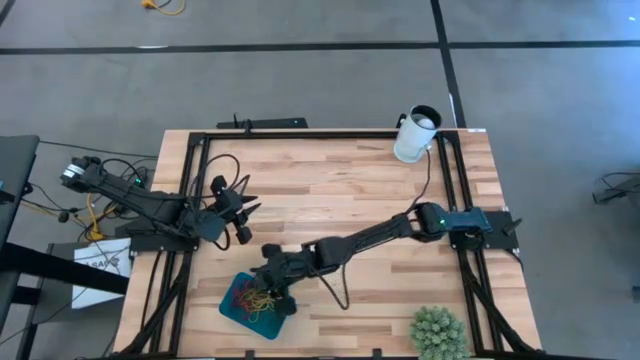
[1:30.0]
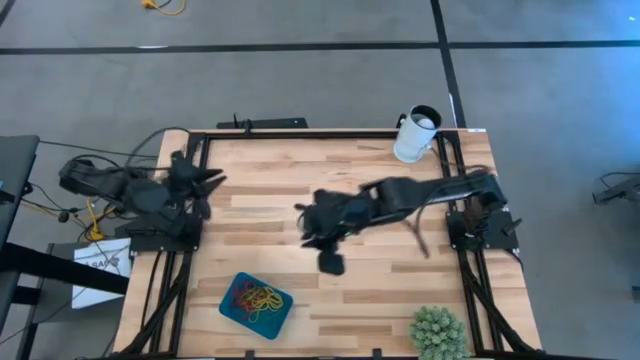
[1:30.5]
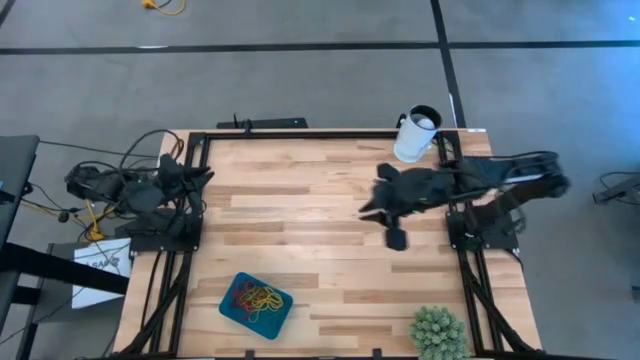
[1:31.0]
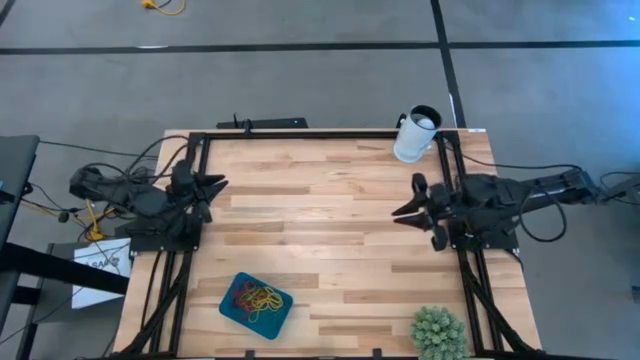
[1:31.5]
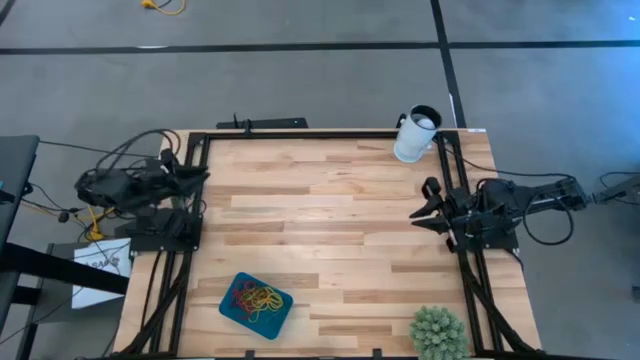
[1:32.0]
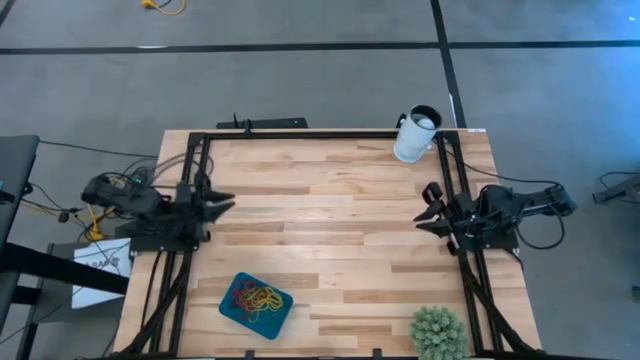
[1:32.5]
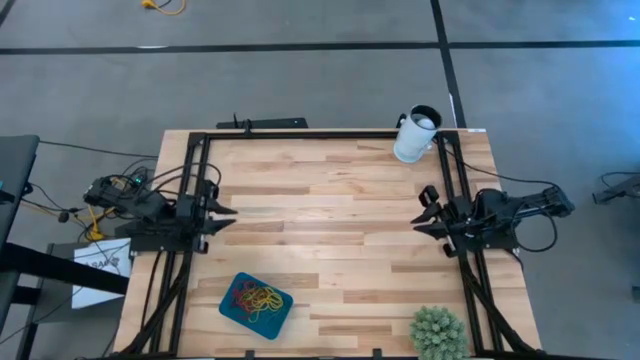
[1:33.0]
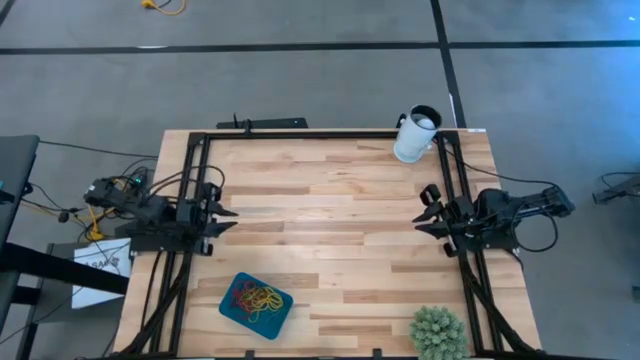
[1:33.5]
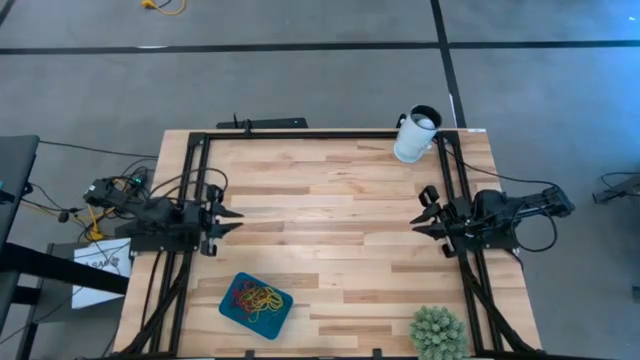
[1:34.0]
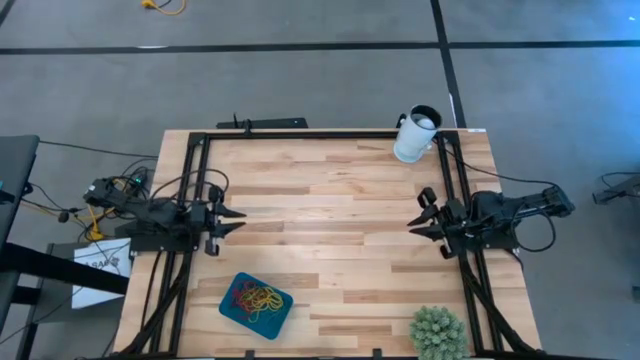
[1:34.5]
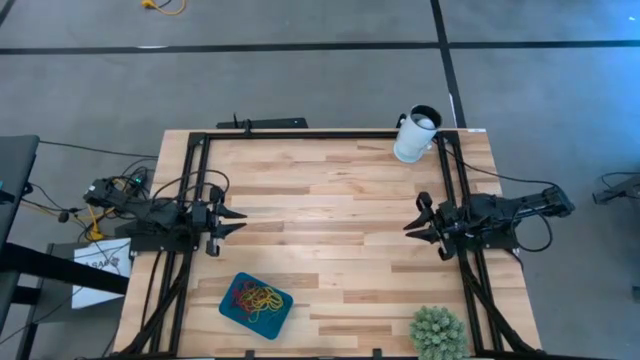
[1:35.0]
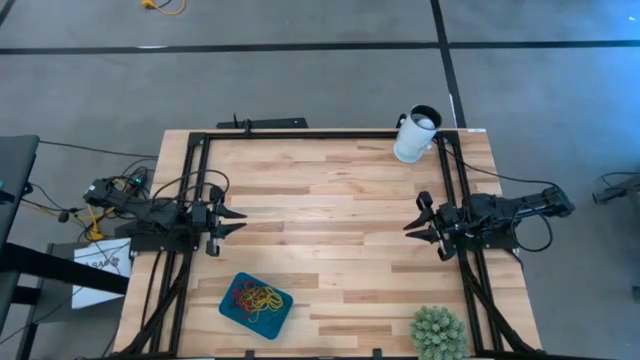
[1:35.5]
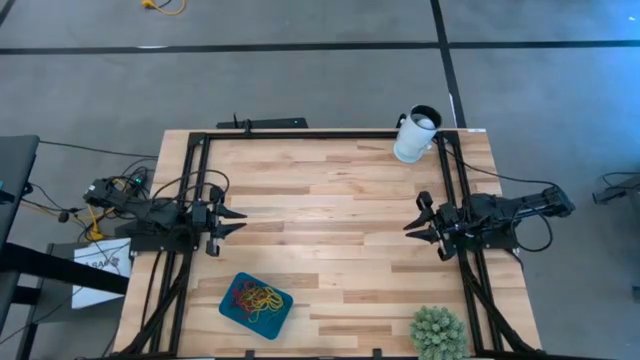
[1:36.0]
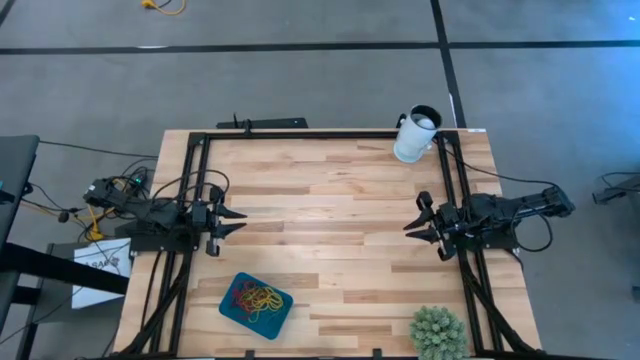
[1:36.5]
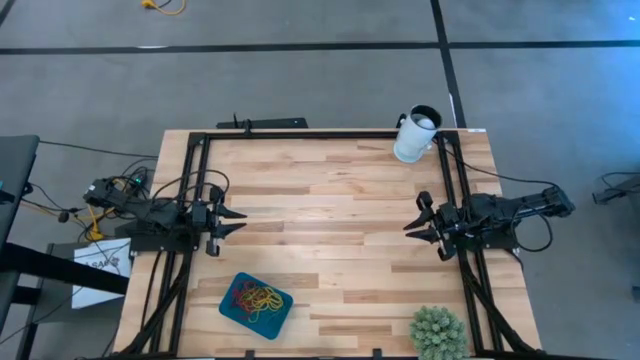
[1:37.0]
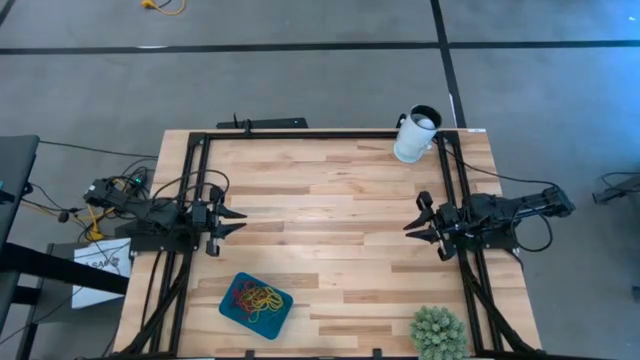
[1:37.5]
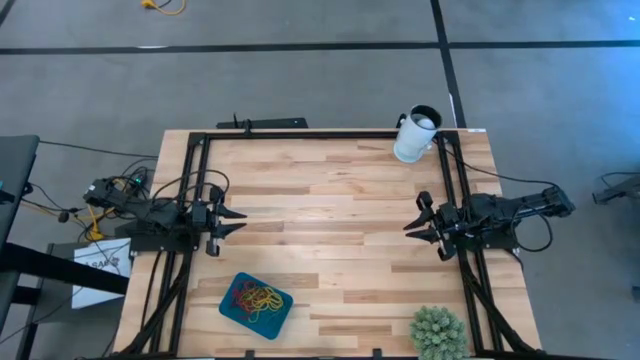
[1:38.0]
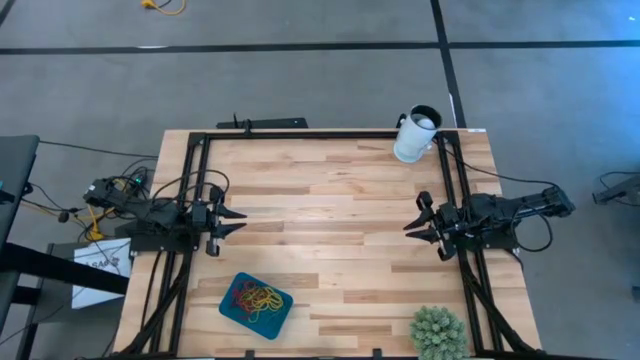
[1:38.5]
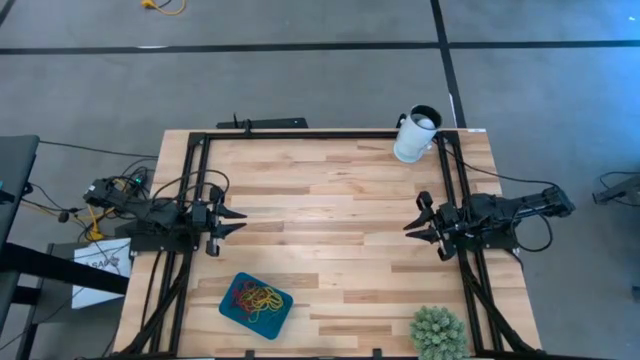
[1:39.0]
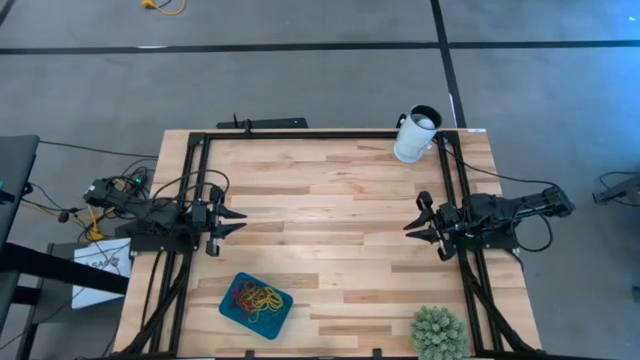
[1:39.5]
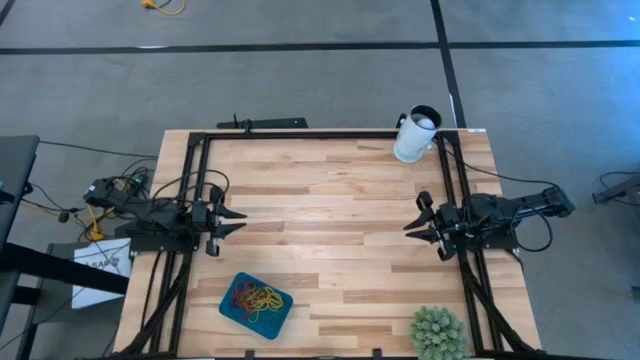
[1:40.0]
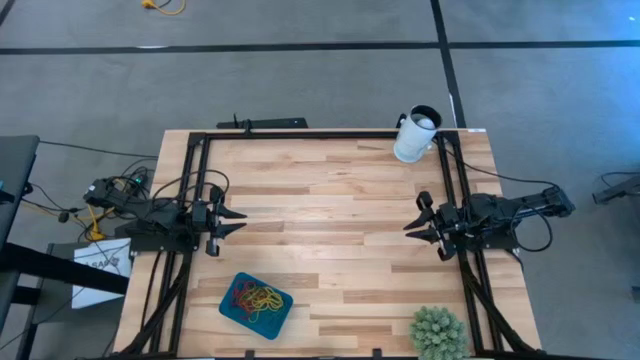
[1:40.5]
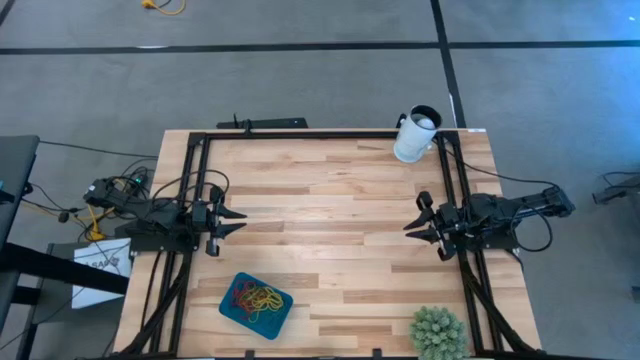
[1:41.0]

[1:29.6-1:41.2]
Task: Pick and place items into bin
Return to Home Position

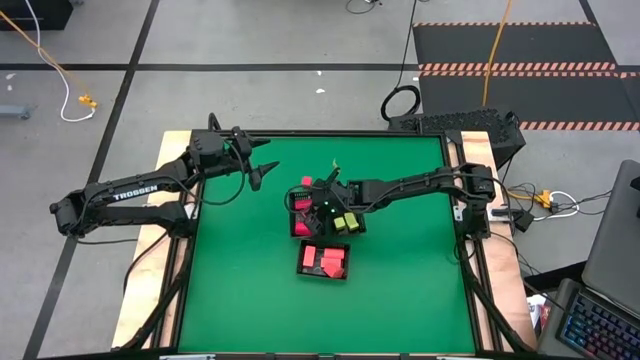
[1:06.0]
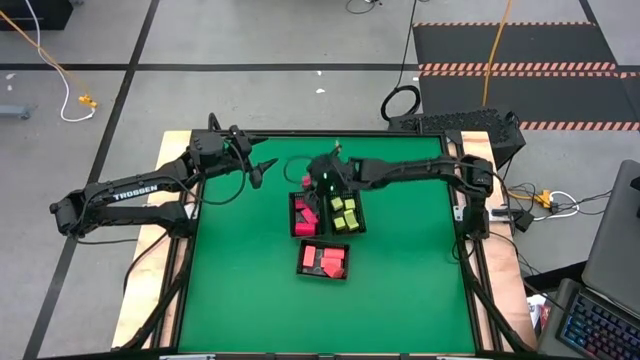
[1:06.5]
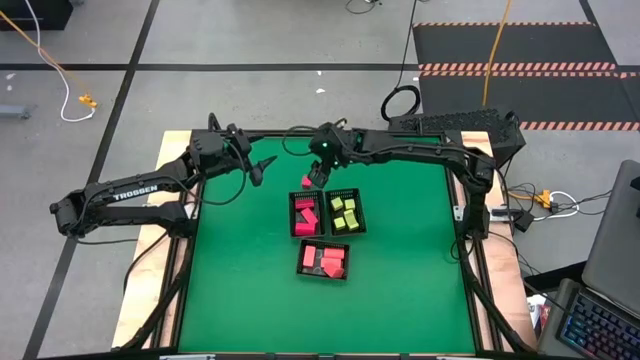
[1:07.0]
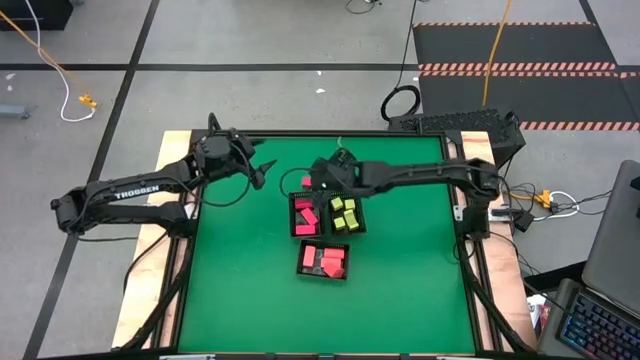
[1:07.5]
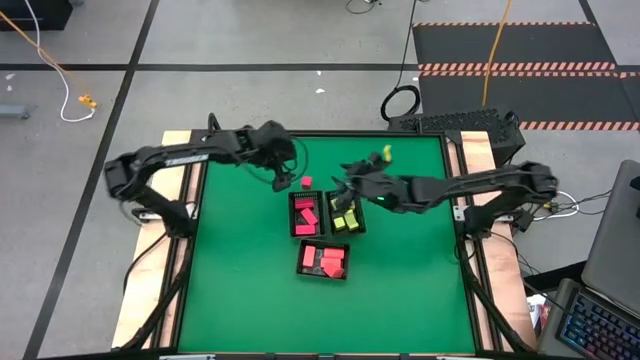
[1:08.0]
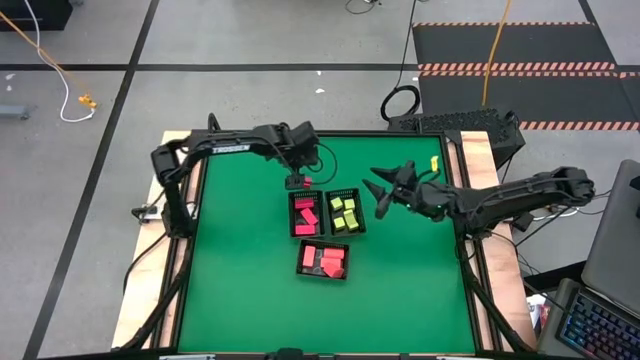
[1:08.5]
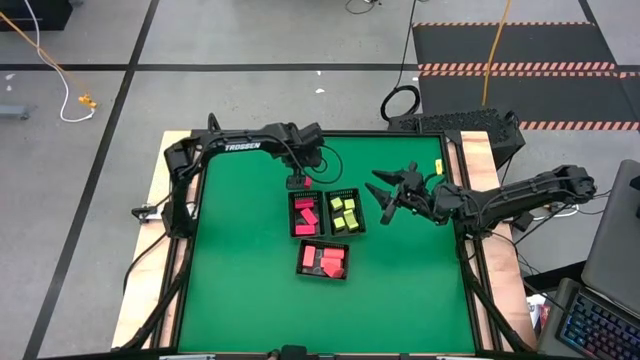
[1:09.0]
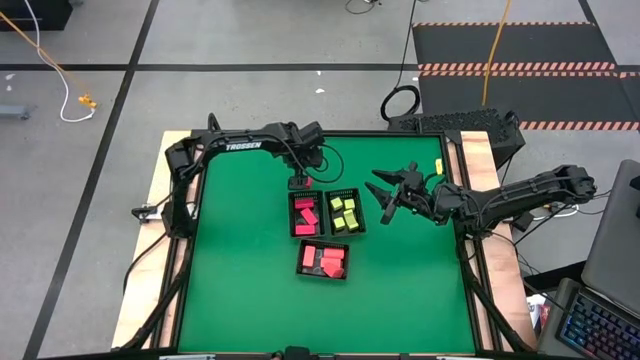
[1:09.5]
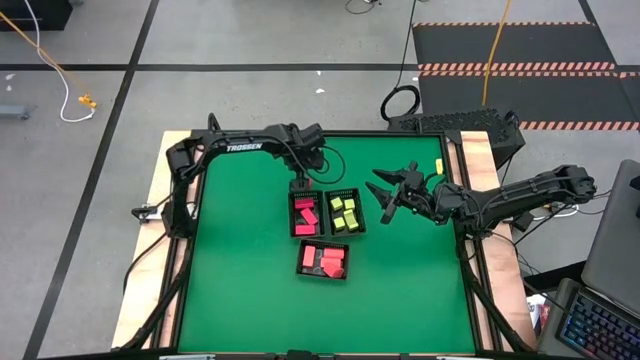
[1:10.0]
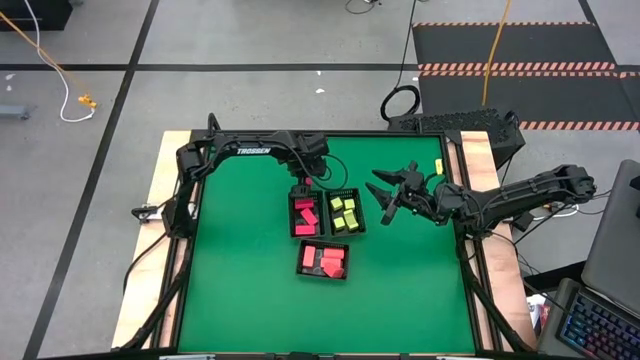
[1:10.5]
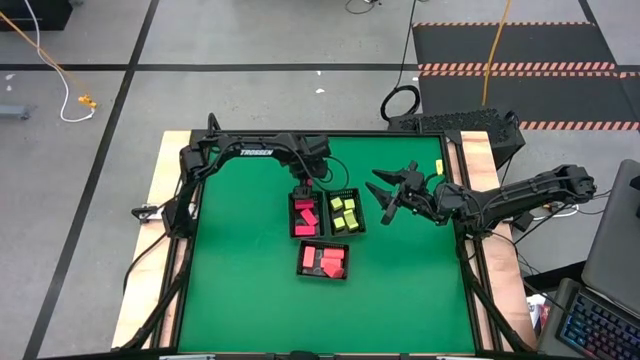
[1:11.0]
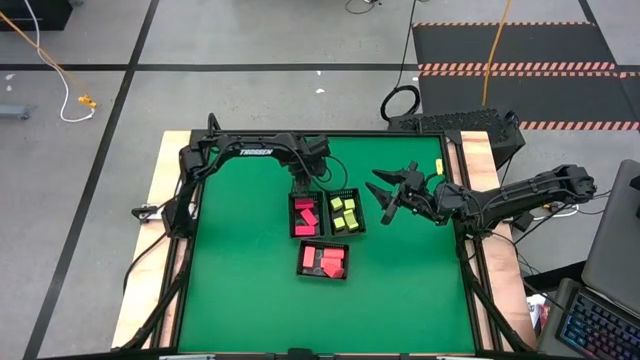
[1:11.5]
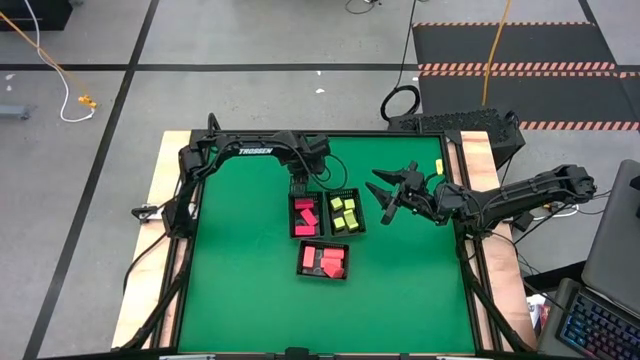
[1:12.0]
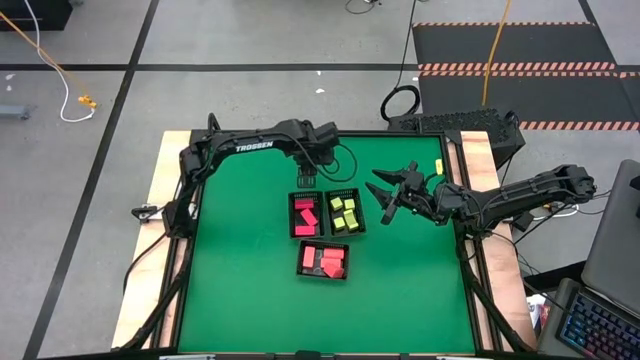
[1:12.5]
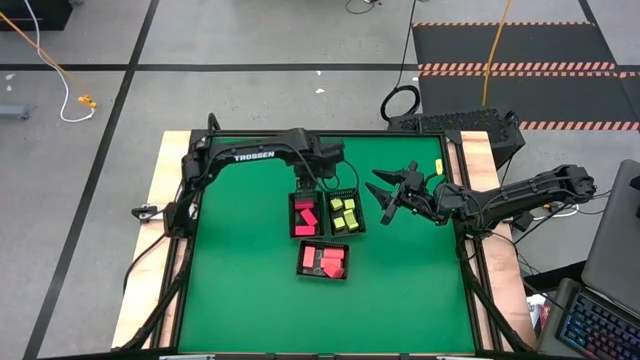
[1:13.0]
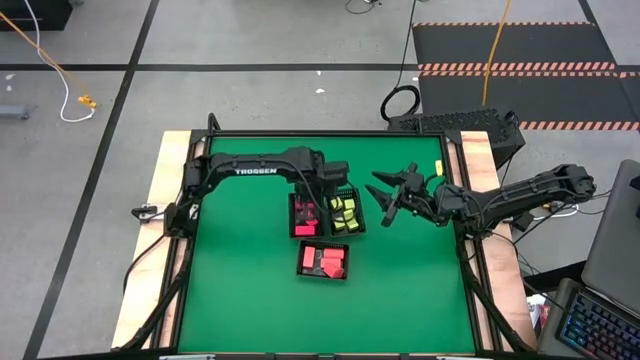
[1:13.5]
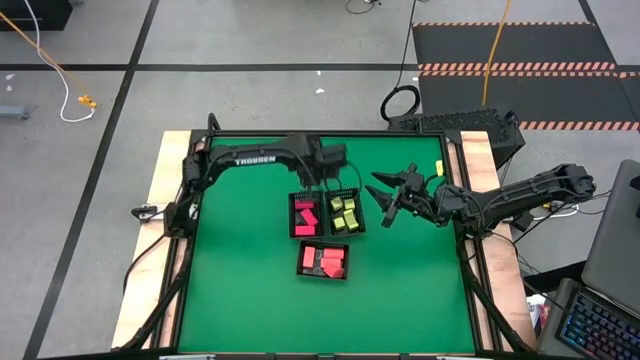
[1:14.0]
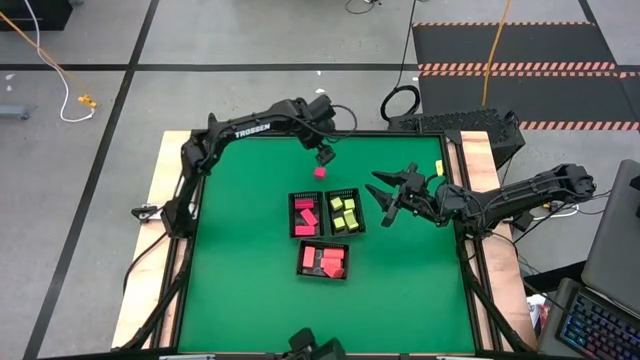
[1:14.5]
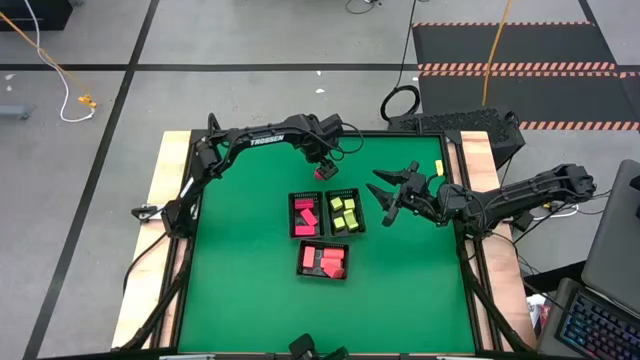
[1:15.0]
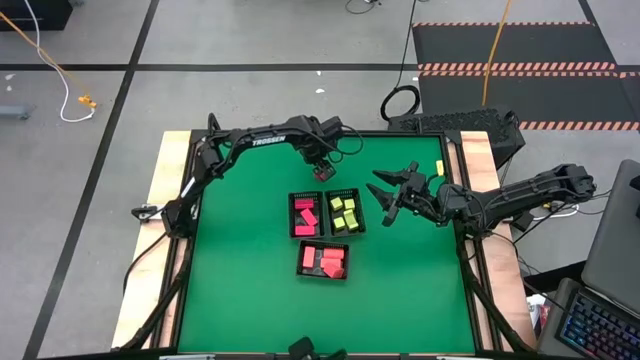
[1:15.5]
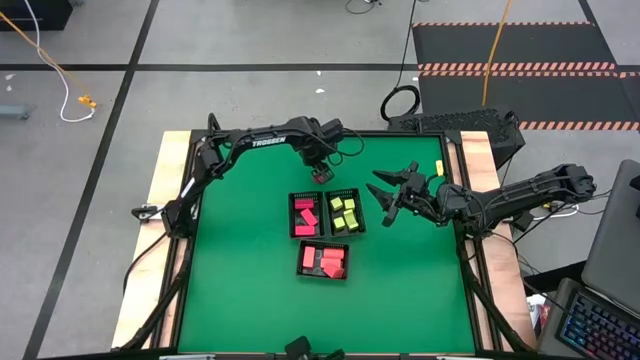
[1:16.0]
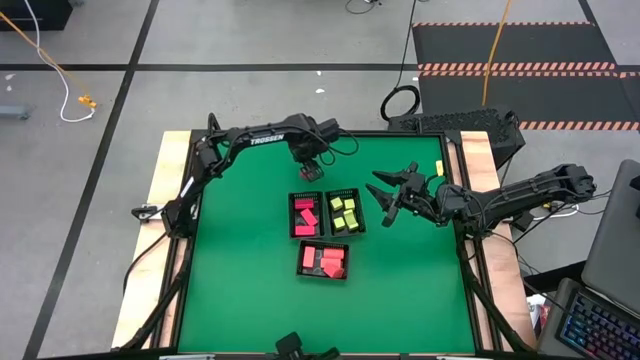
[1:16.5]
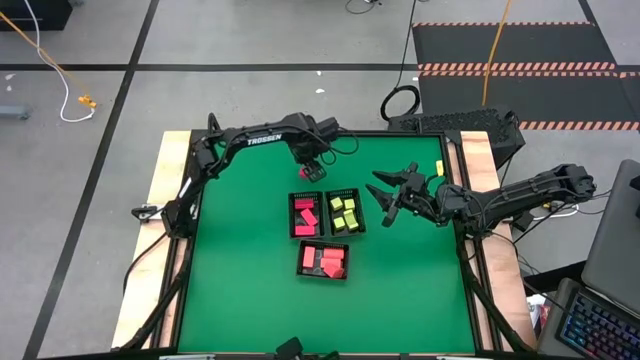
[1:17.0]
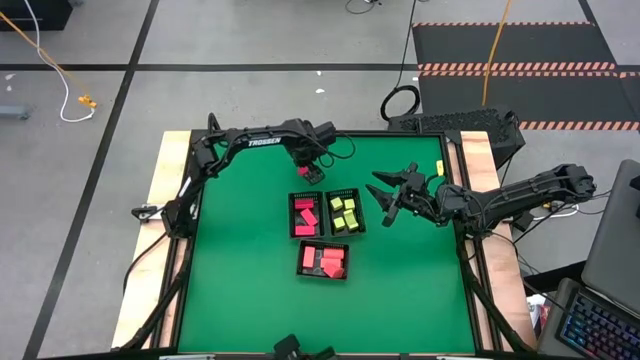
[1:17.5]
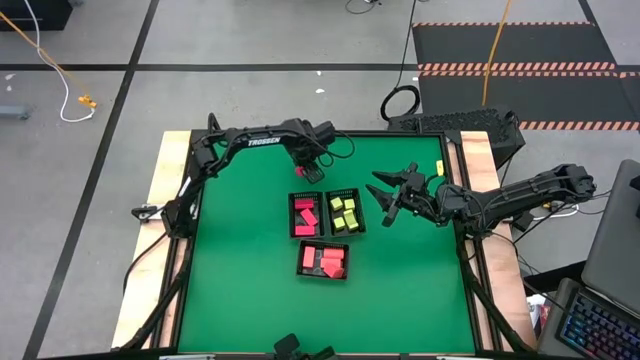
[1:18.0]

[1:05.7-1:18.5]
Task: Sort & place blocks by color
Put the red block into the top left black bin
